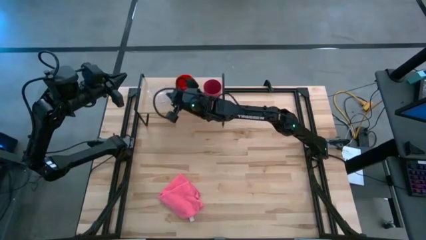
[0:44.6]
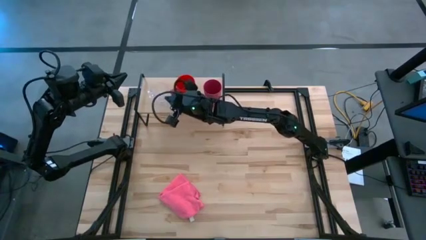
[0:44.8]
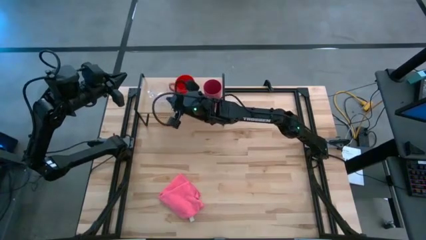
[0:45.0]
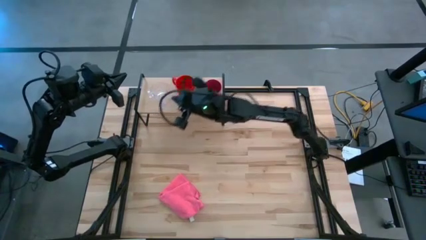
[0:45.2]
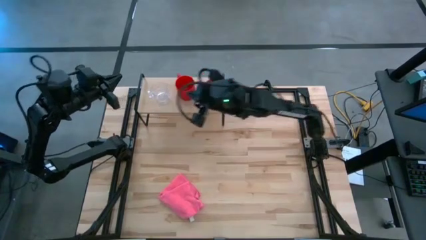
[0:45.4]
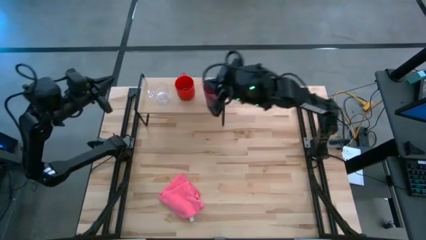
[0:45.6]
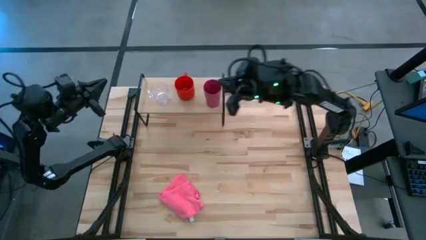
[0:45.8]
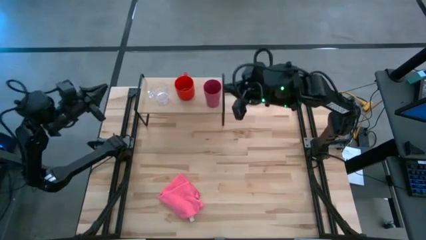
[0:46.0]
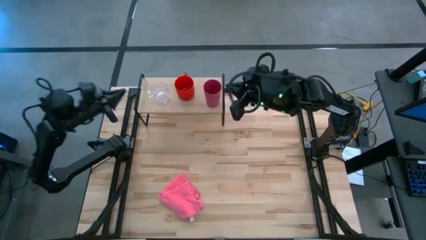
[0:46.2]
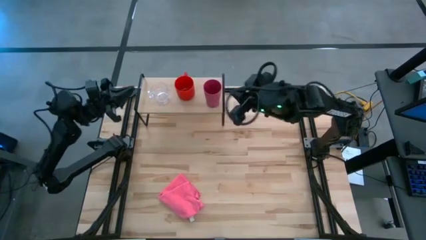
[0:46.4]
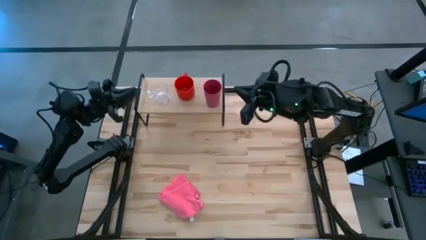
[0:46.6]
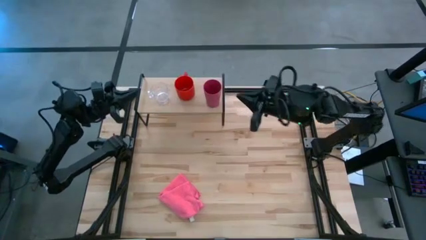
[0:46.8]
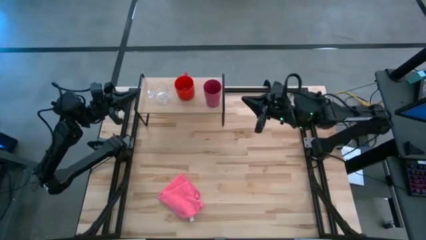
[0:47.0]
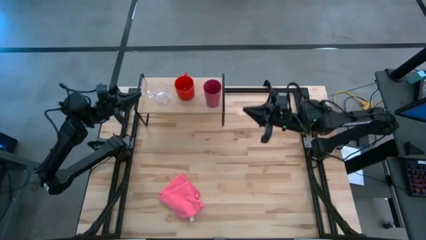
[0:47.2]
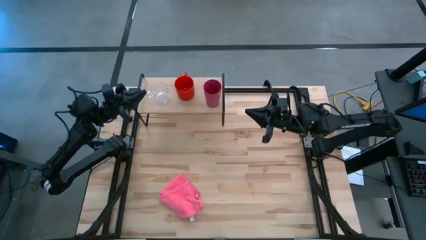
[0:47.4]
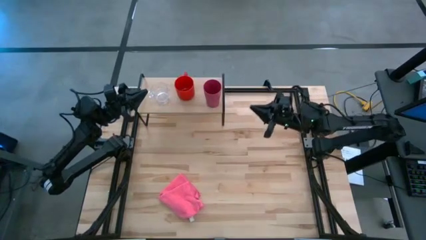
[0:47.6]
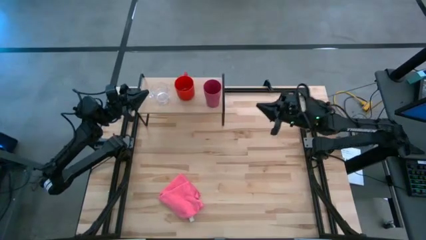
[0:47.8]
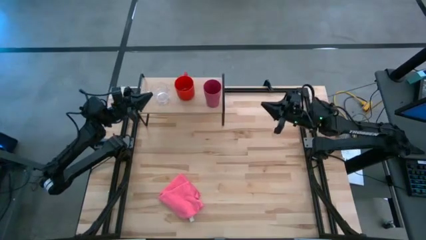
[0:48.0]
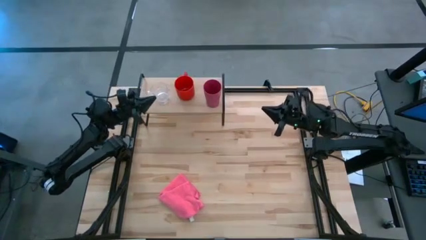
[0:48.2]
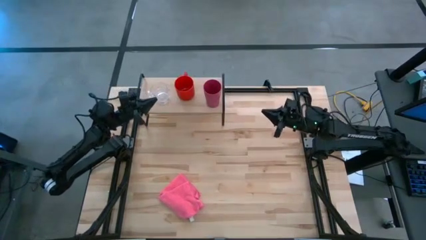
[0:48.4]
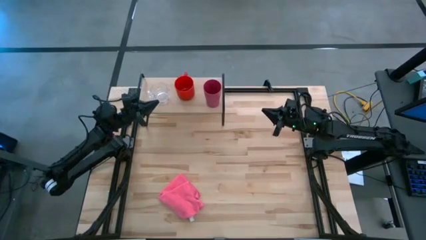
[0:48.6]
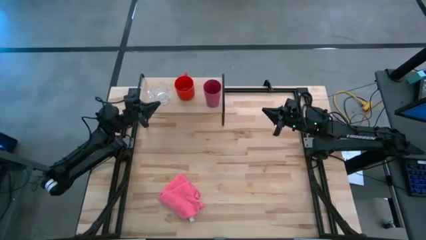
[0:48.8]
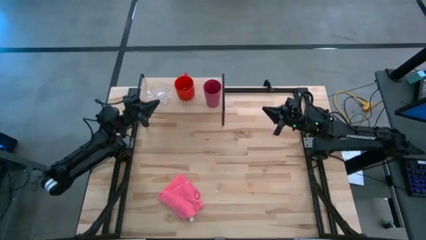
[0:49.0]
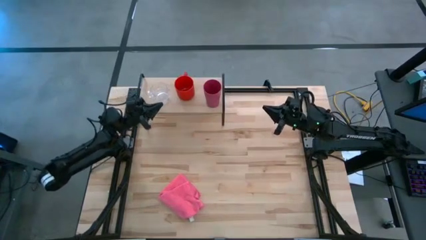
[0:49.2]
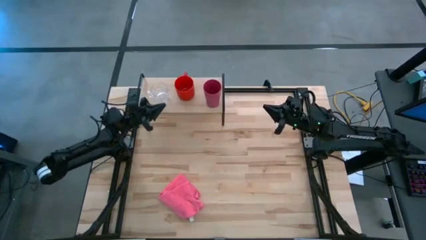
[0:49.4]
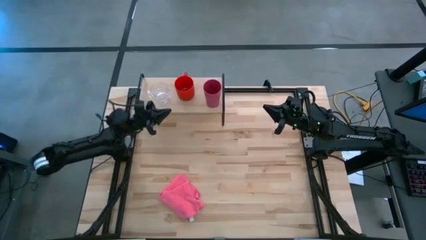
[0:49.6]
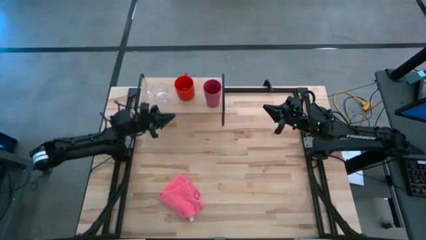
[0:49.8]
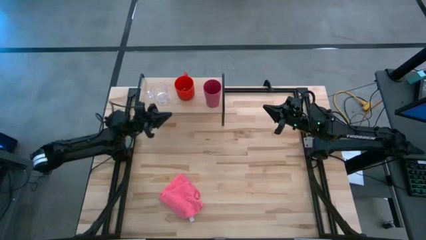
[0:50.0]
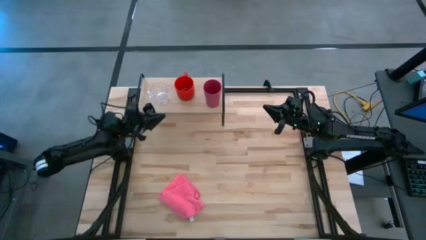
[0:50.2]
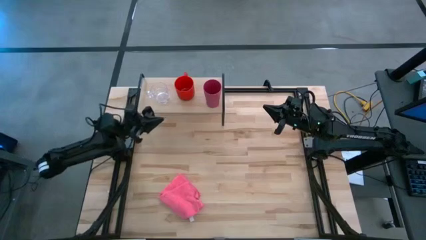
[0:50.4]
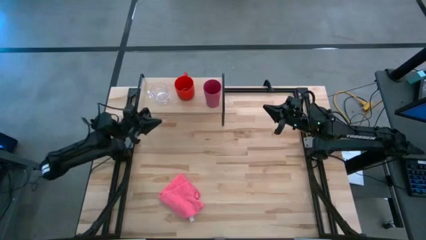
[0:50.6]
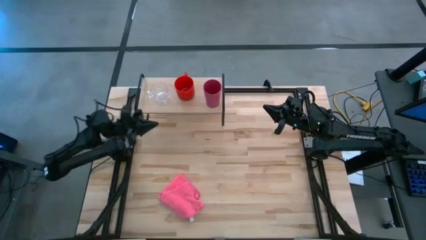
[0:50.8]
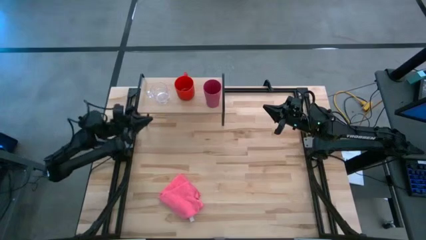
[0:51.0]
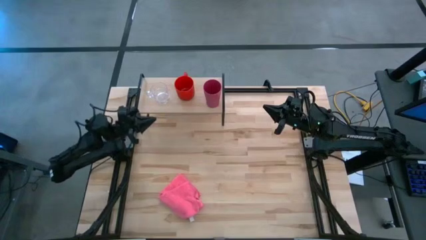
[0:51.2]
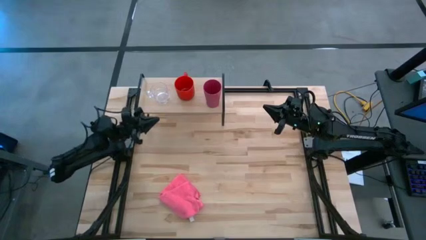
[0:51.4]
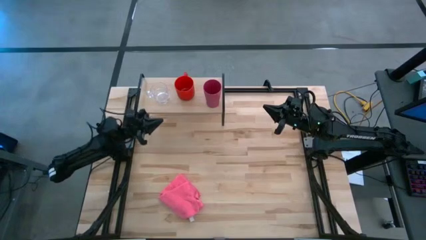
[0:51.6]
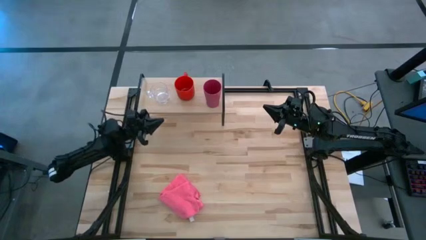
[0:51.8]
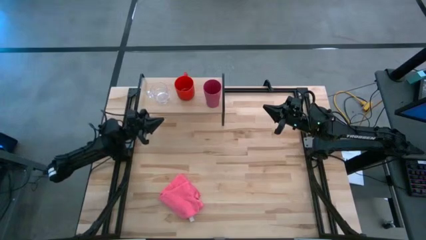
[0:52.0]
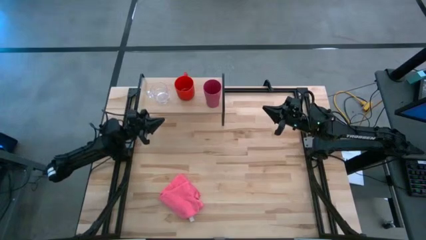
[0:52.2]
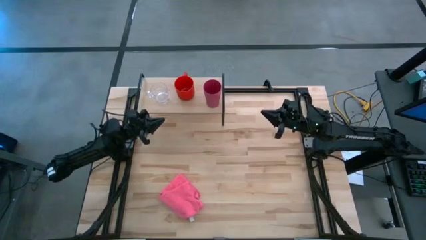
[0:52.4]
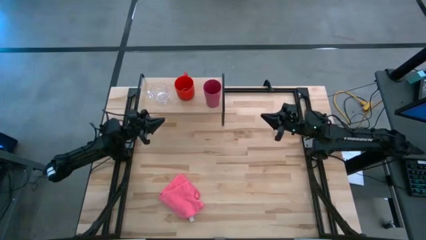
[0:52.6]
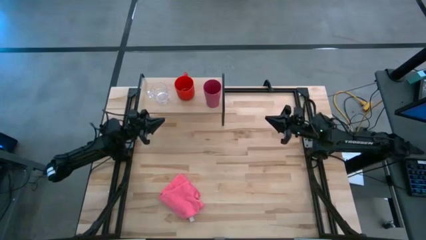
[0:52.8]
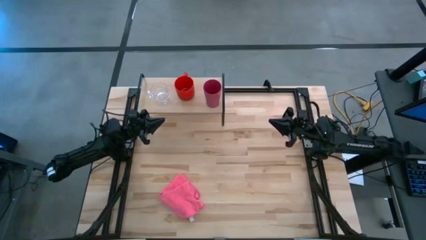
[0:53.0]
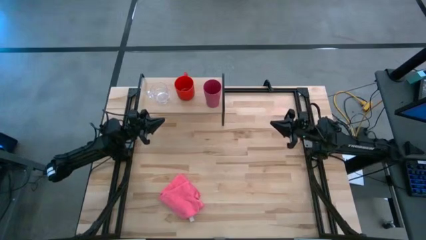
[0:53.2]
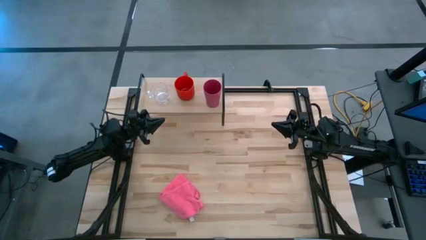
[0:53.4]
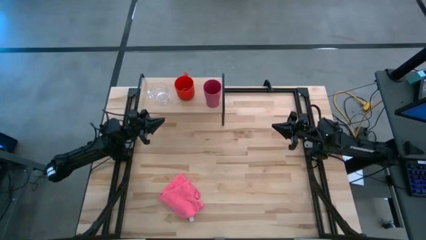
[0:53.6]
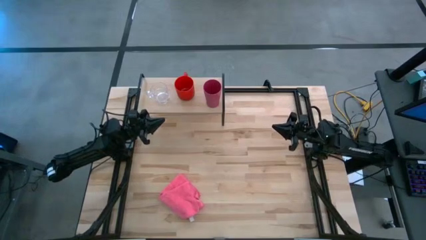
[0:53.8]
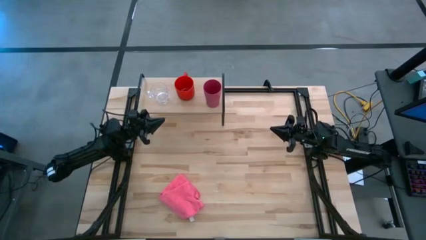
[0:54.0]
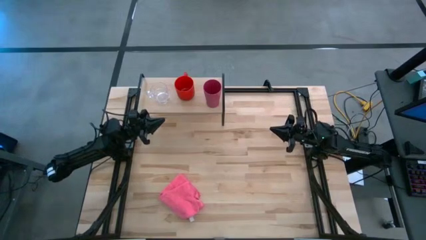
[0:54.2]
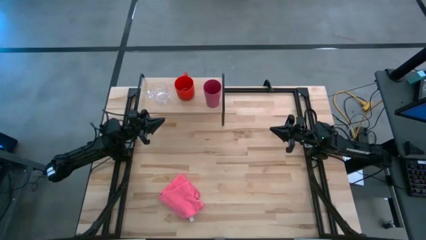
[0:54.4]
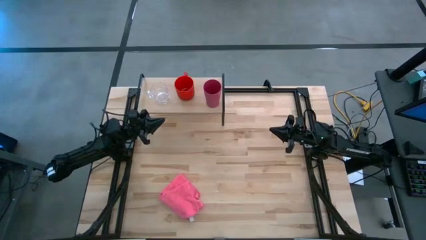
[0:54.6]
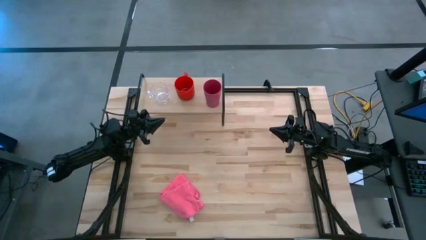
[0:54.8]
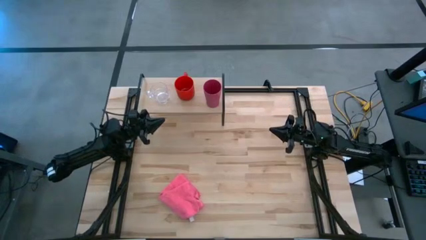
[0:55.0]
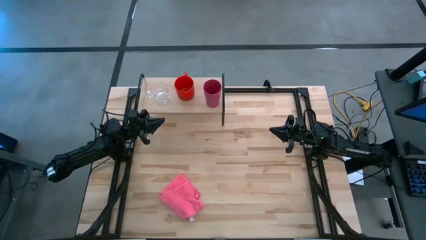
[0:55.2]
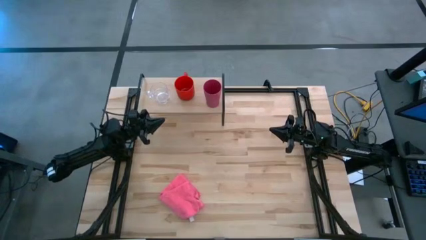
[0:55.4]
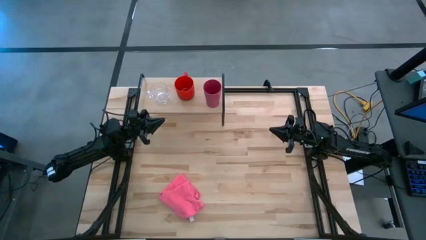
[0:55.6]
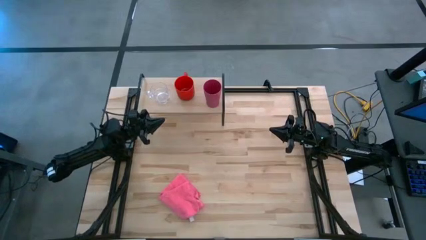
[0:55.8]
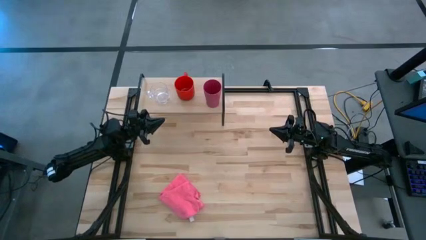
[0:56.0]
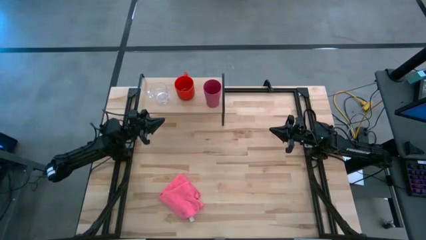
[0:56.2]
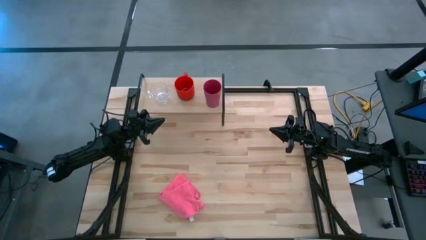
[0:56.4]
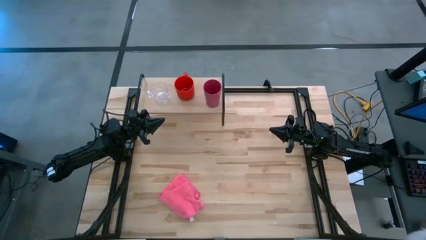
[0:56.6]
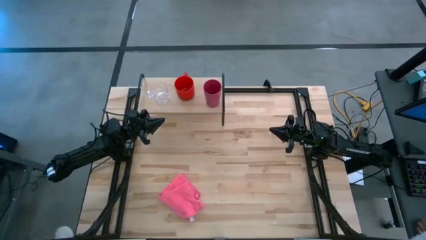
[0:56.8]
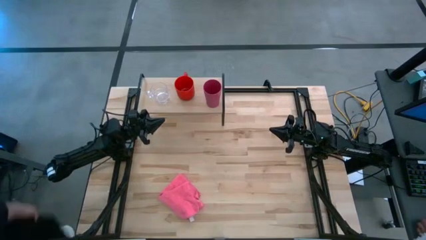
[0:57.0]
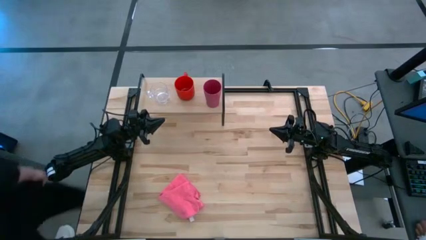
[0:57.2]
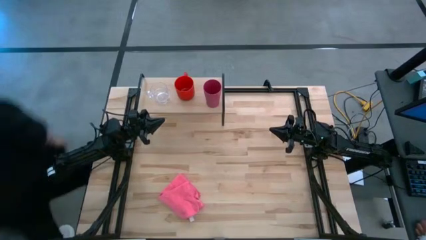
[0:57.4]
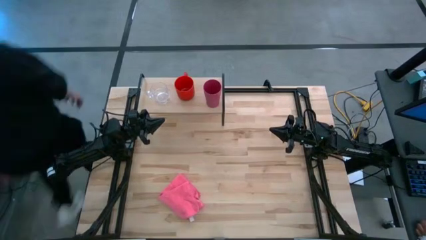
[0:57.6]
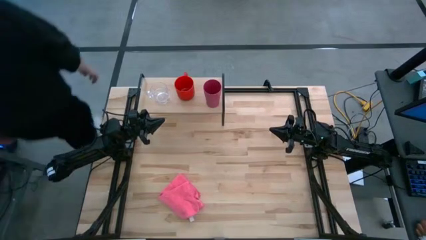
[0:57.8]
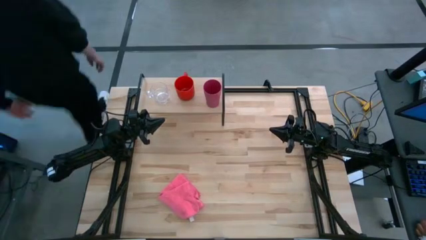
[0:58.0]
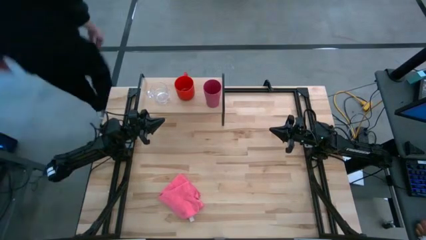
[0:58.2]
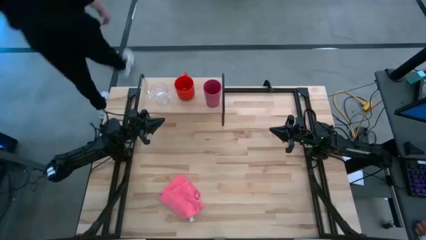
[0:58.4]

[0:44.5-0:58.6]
Task: Stack small to large cups/mugs on shelf
Return to Home Position
